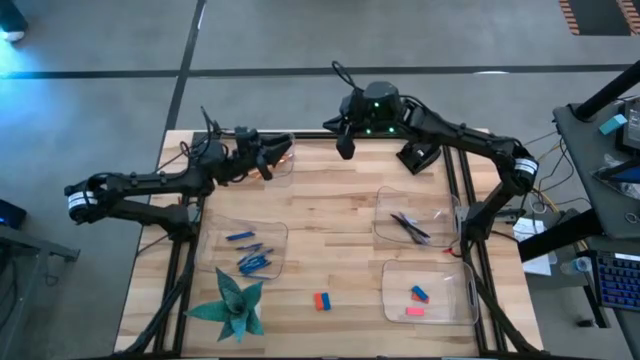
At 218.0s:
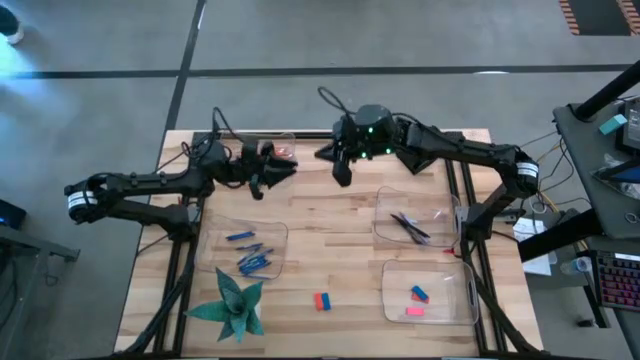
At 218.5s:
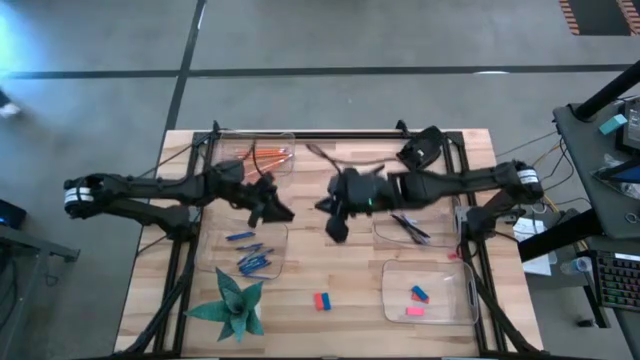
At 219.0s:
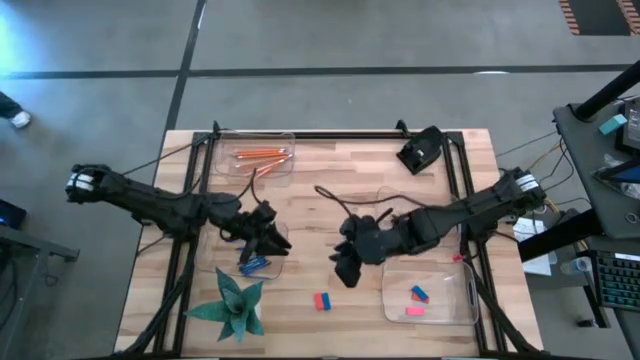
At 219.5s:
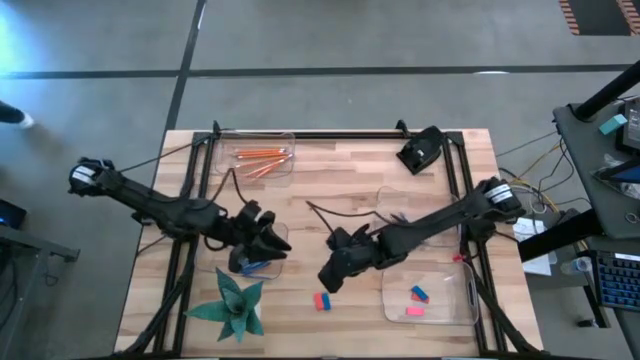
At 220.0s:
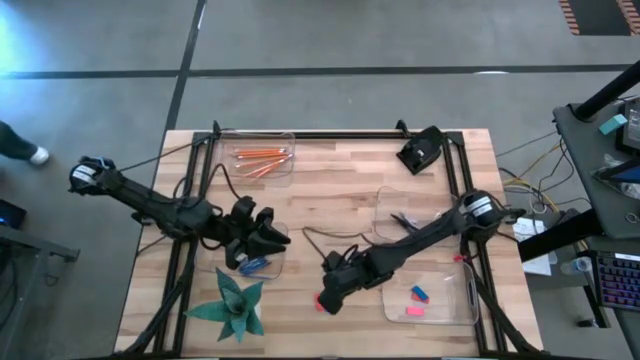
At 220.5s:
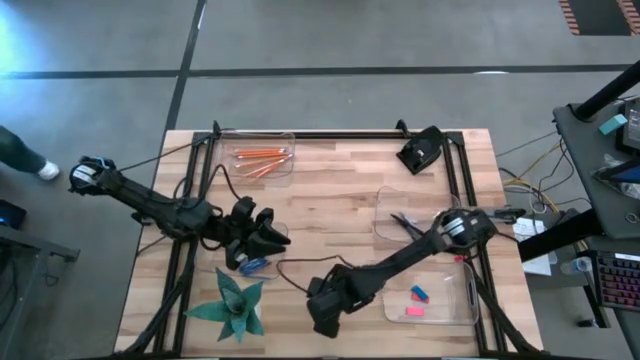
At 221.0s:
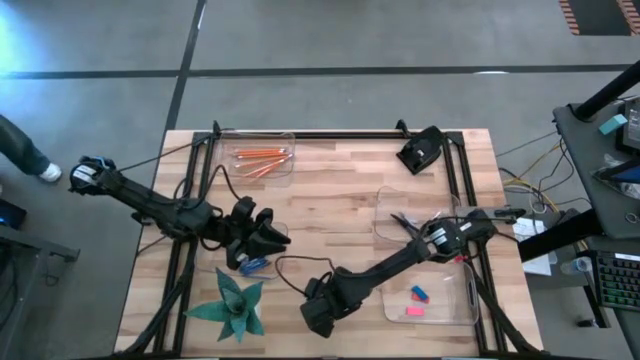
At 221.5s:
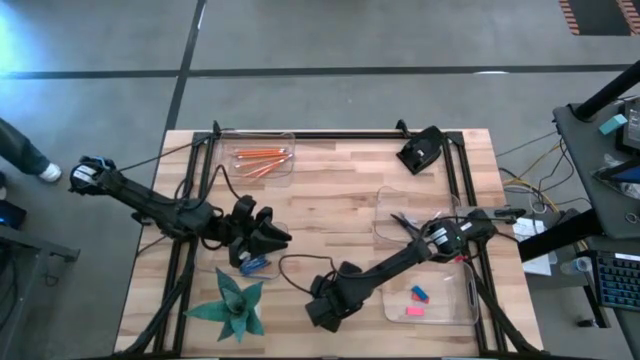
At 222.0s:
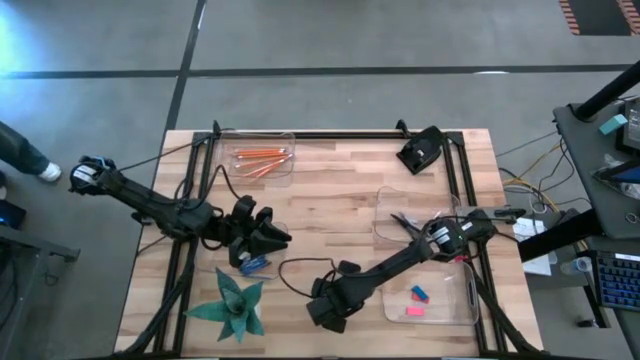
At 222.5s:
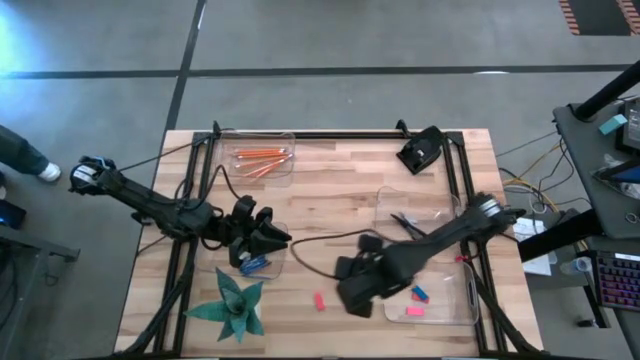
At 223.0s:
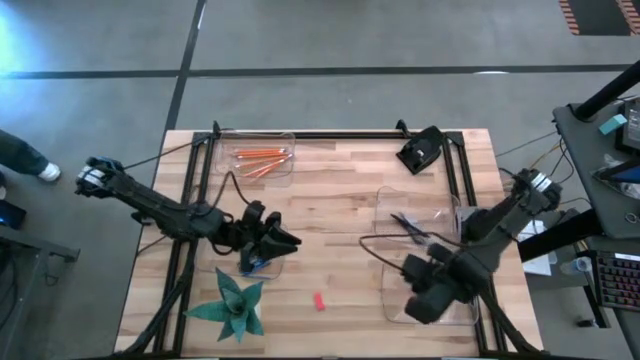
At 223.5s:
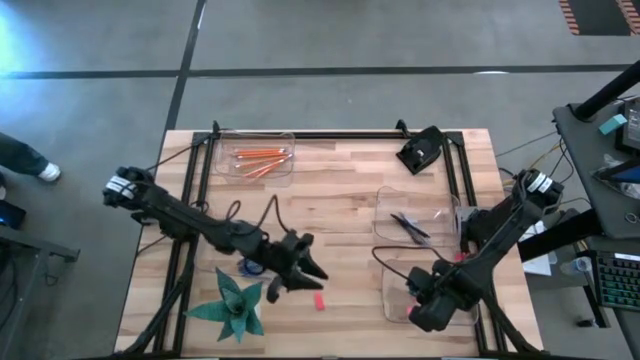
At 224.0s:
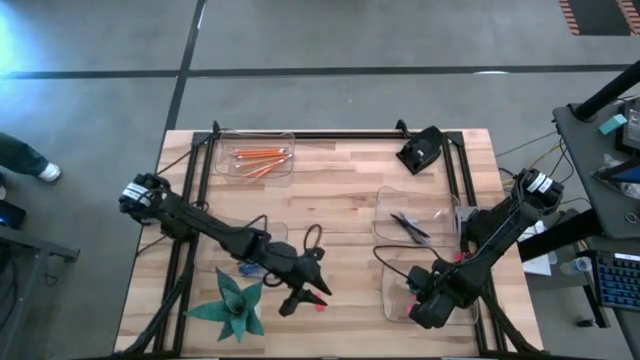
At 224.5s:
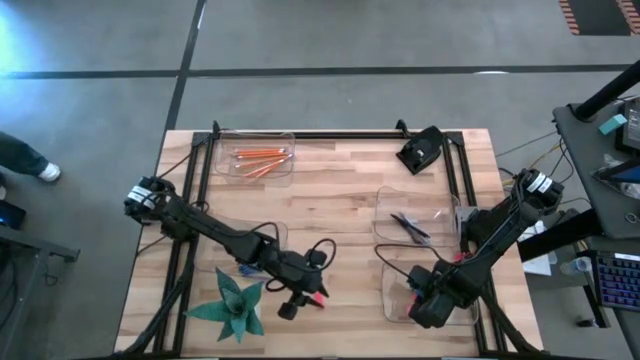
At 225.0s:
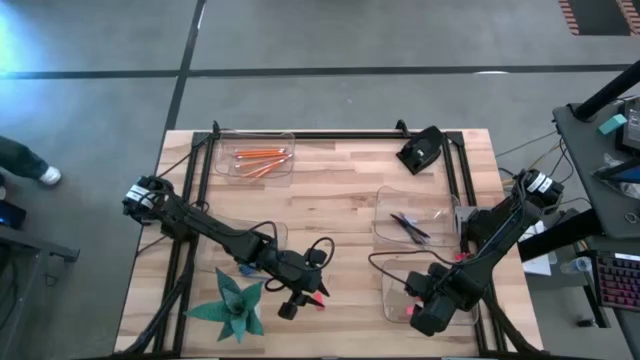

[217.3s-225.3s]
Task: Sort crayons/erasers/pens/pencils in bins
Put the blue eraser into the bottom right transparent bin

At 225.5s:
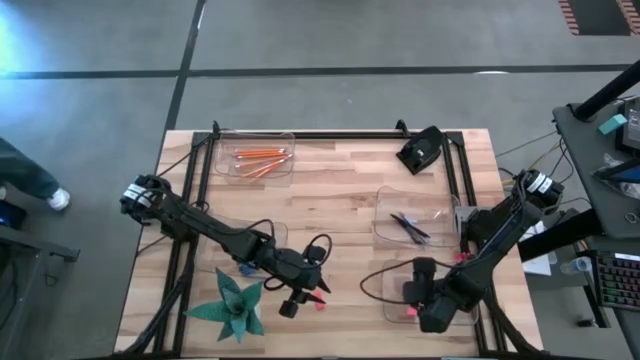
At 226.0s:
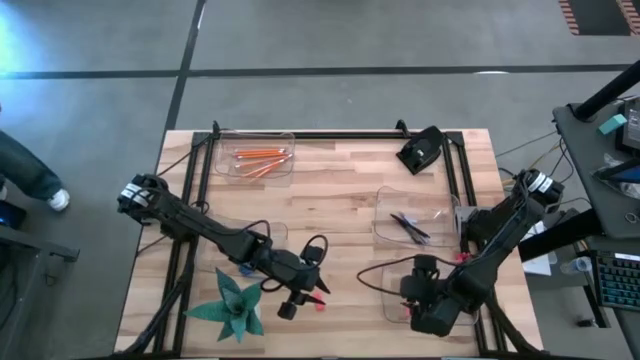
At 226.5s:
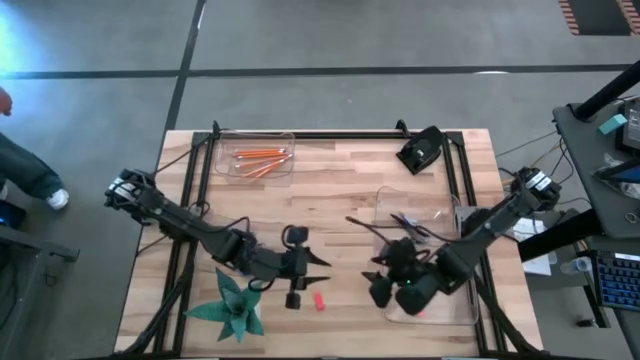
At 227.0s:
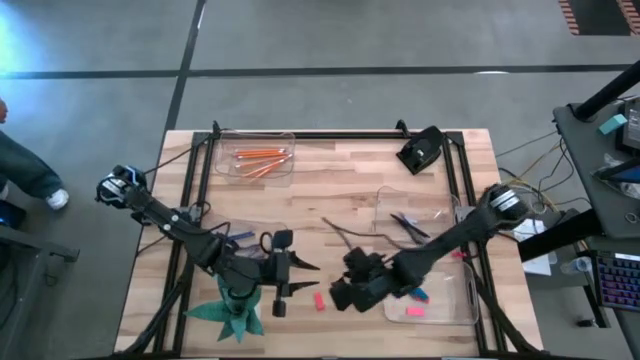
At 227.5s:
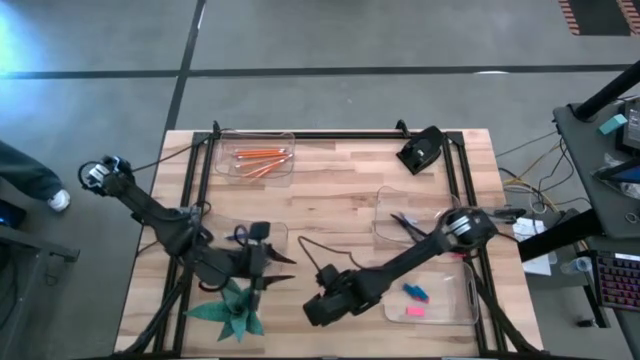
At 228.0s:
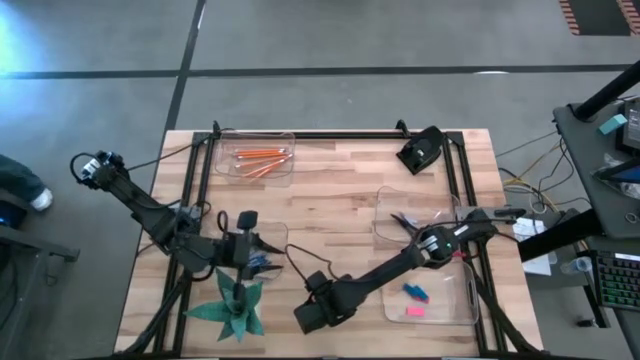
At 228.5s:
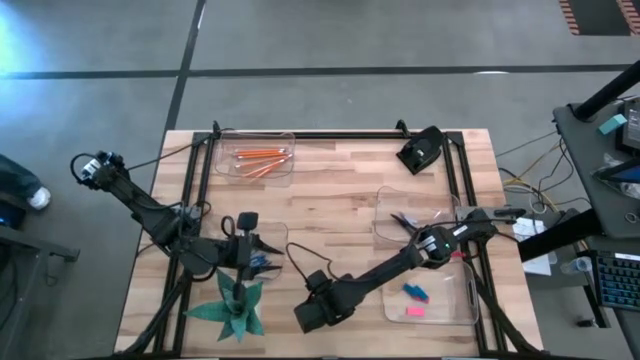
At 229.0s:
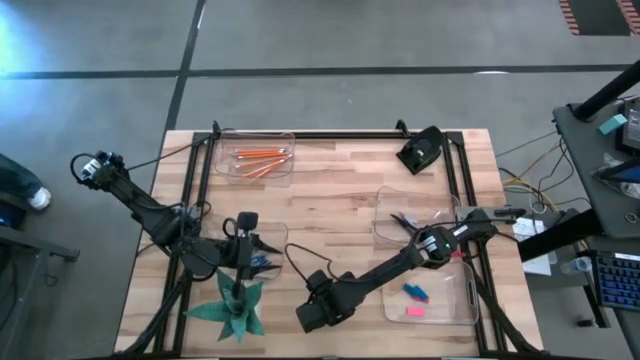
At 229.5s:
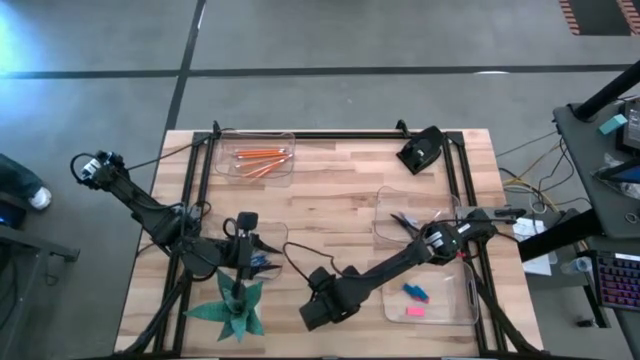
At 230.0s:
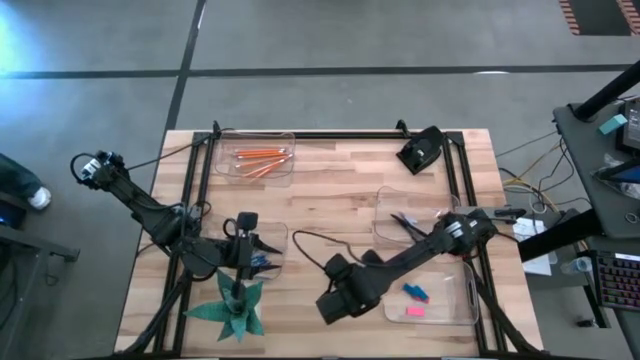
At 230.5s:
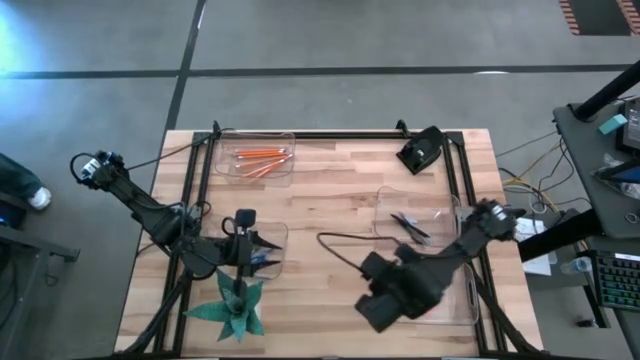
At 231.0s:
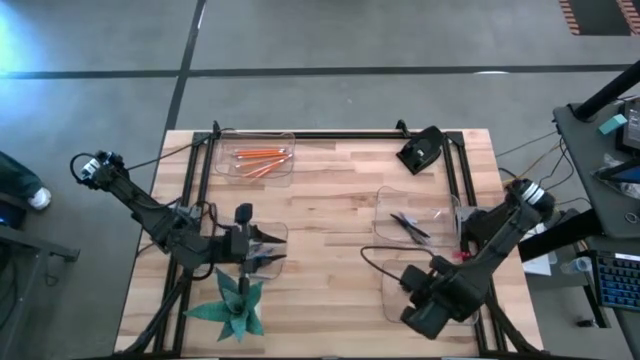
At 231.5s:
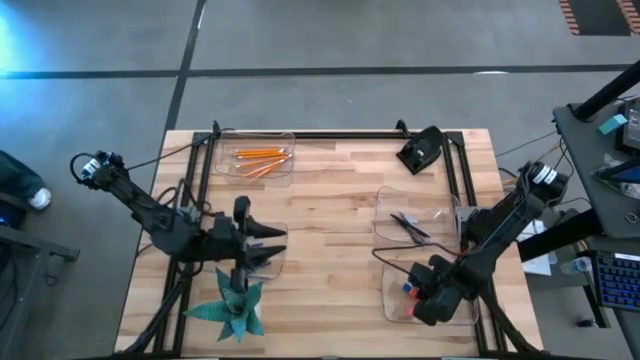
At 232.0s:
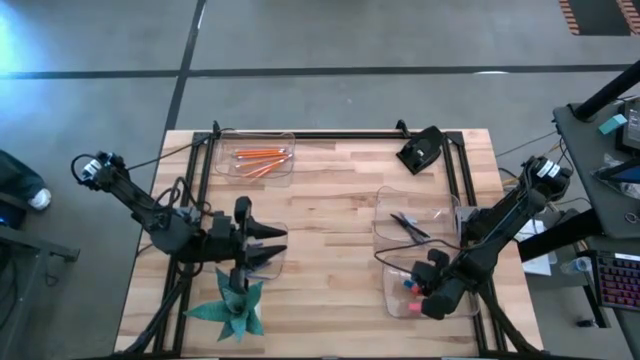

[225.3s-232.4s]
Put the orange eraser into the bottom right transparent bin

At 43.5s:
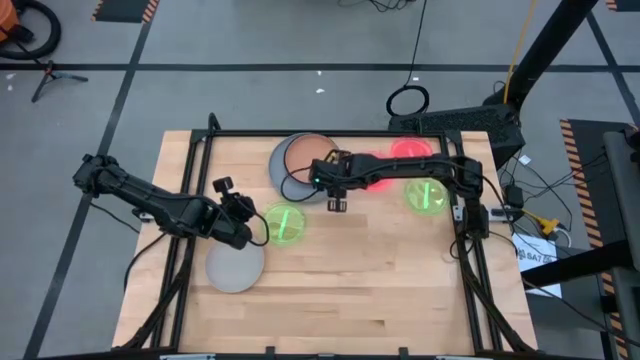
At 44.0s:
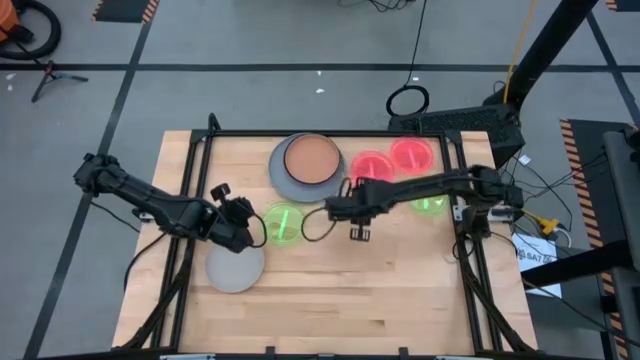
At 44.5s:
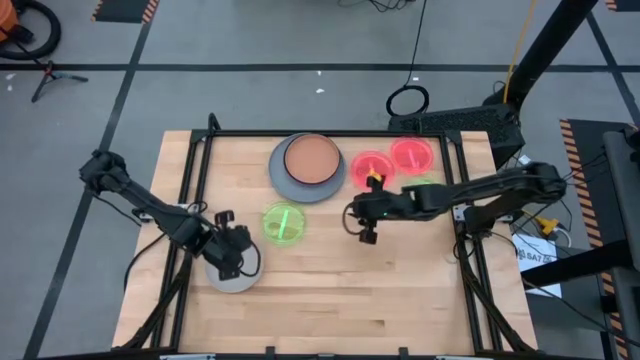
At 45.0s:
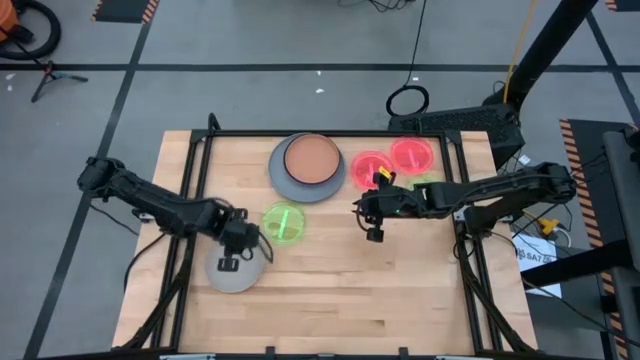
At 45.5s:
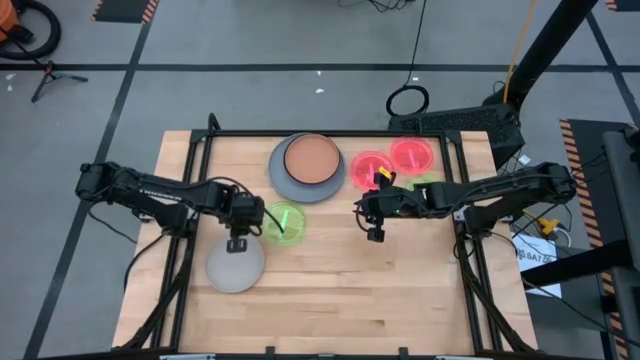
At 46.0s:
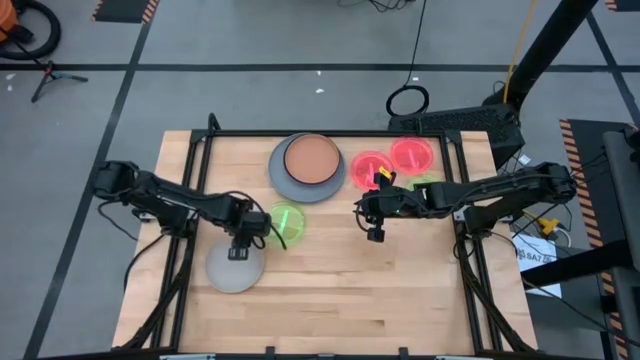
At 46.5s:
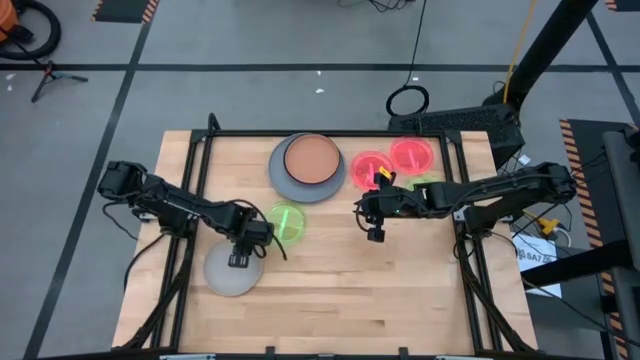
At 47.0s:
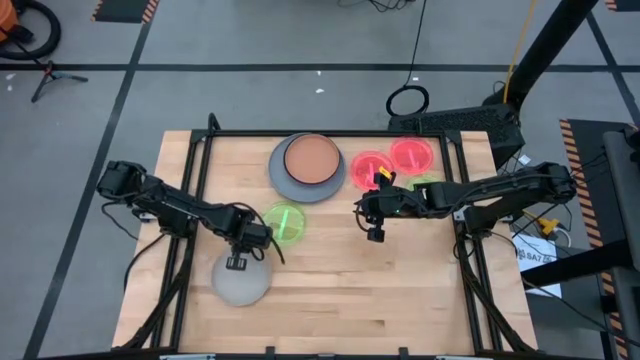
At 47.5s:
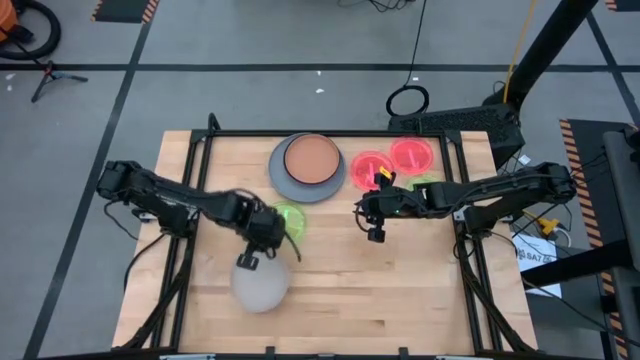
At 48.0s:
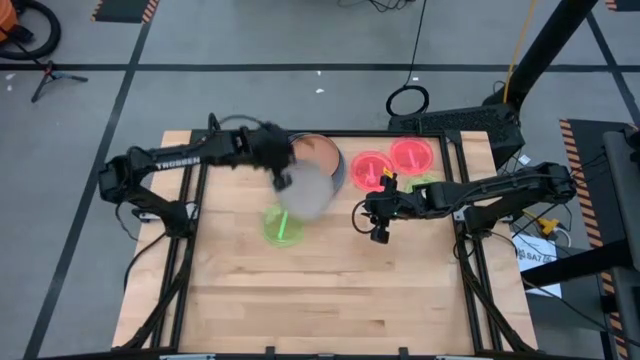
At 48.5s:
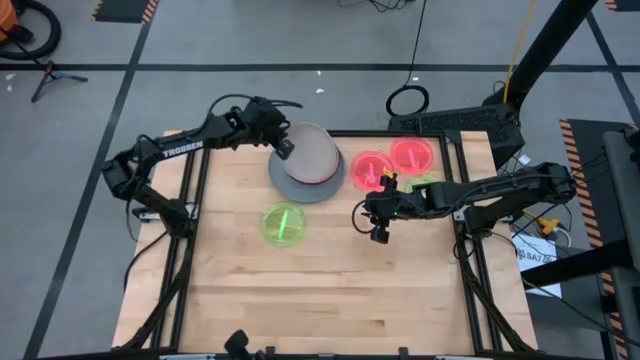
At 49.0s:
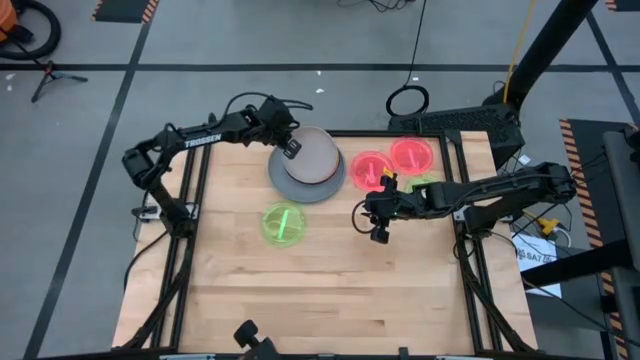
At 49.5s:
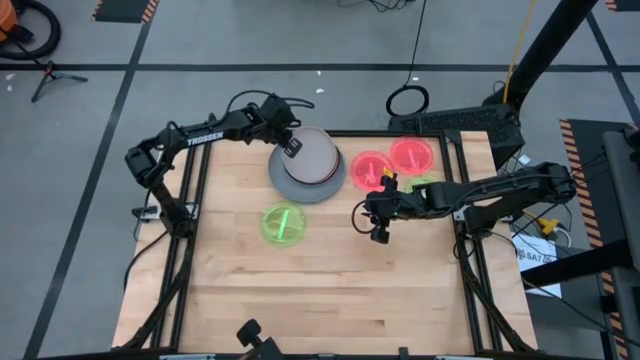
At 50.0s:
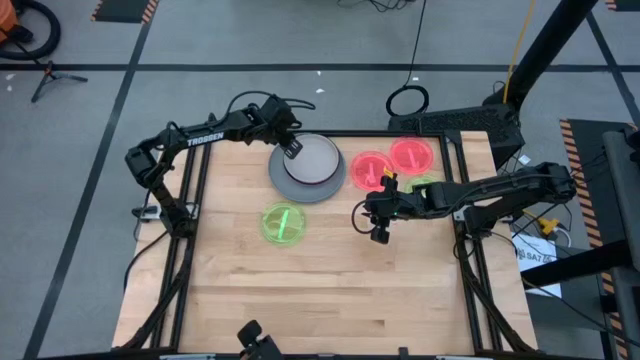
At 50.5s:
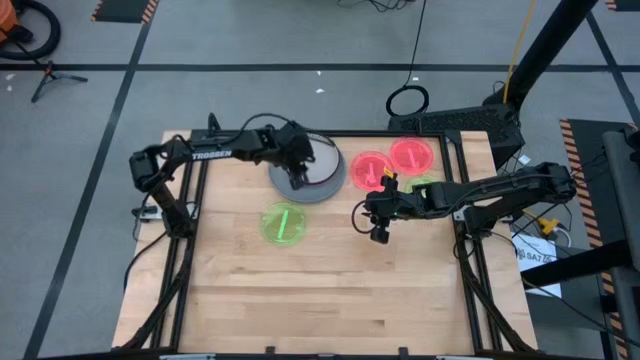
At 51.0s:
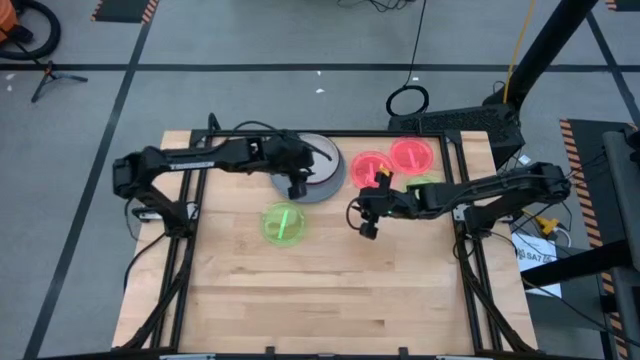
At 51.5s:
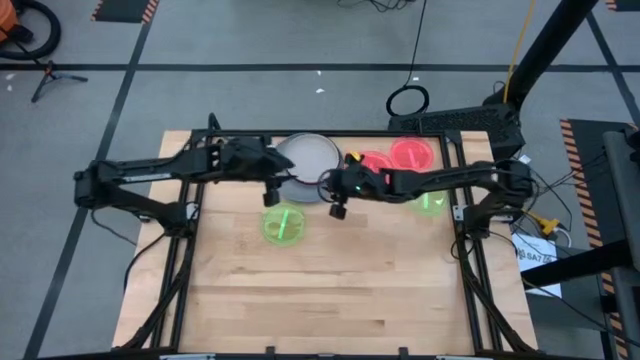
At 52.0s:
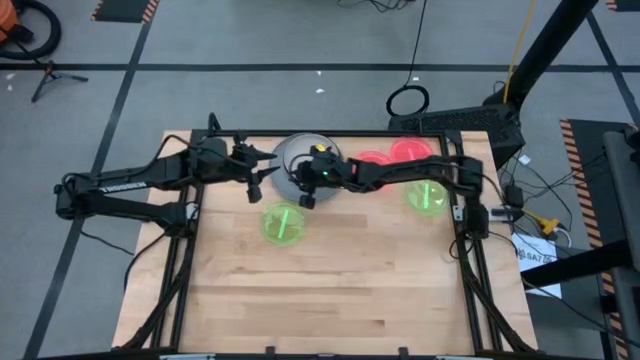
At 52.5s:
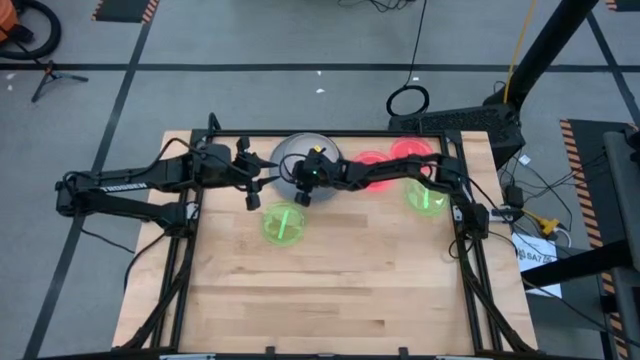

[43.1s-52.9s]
Task: Stack plastic plates
Stack the light gray plate on top of the brown plate
